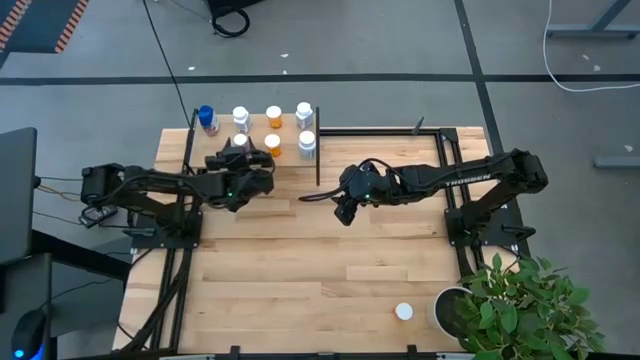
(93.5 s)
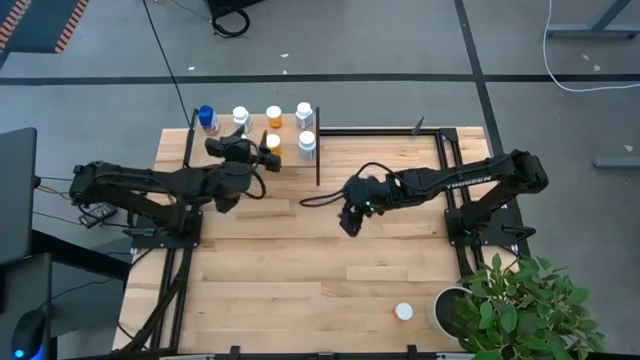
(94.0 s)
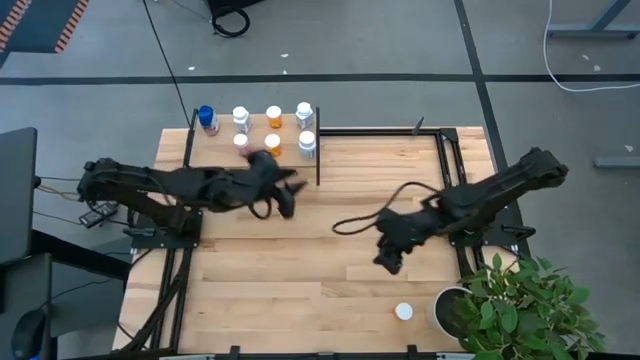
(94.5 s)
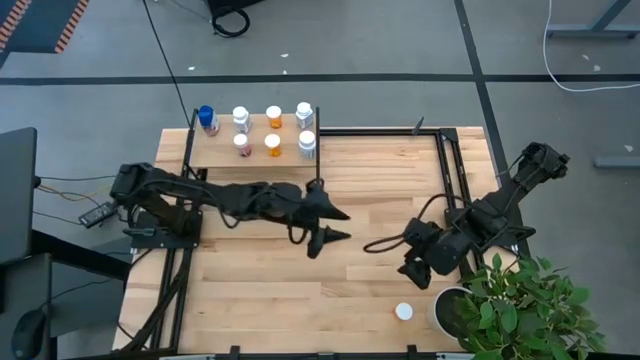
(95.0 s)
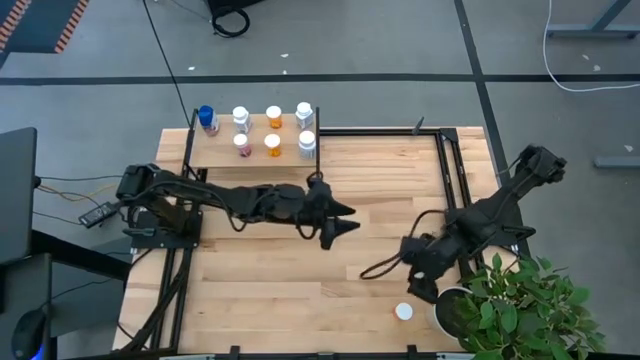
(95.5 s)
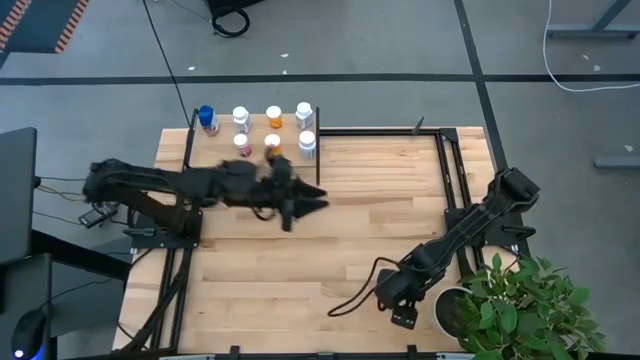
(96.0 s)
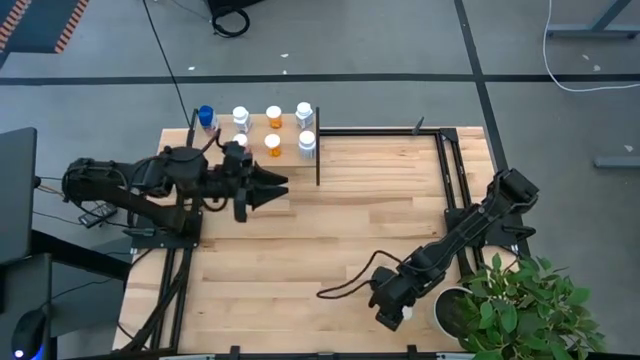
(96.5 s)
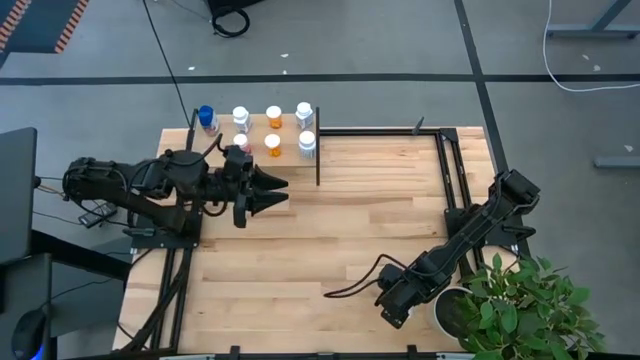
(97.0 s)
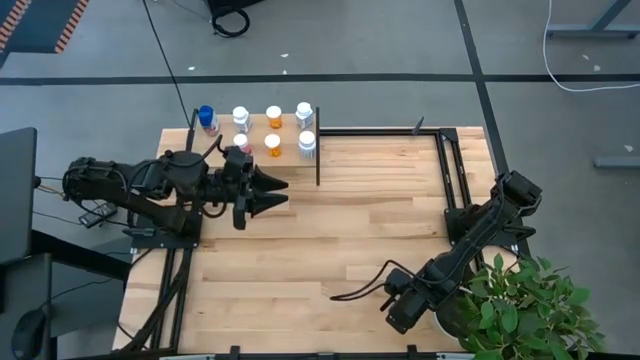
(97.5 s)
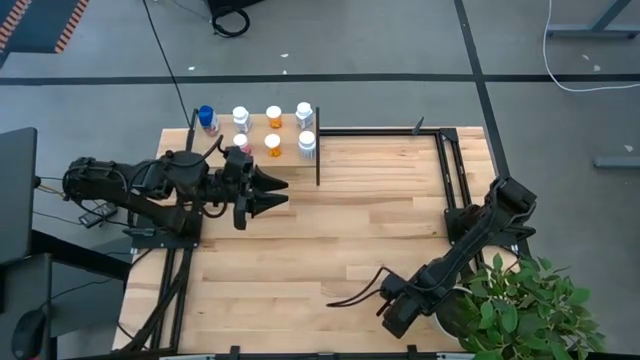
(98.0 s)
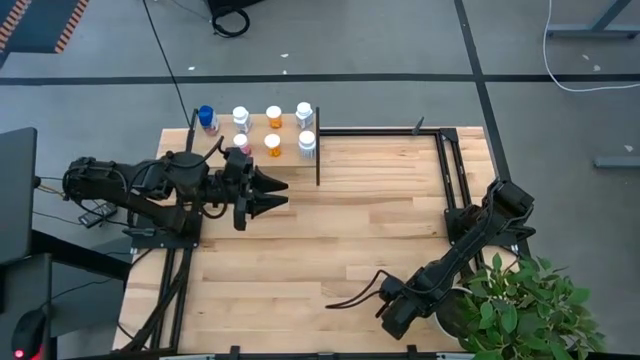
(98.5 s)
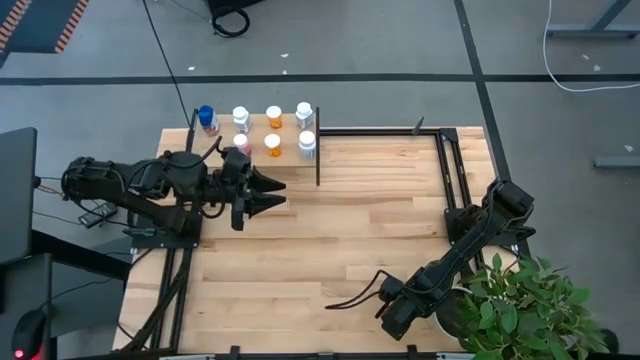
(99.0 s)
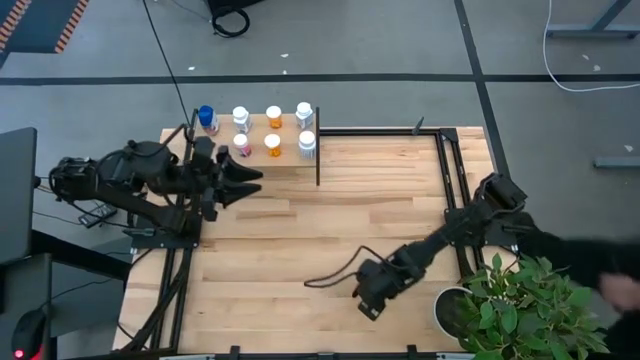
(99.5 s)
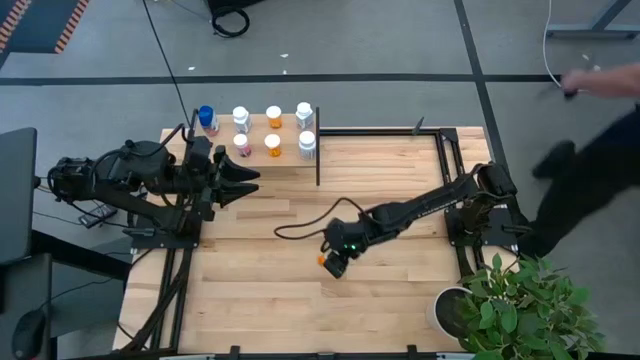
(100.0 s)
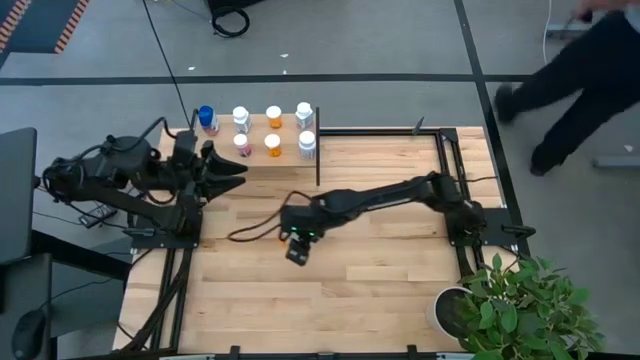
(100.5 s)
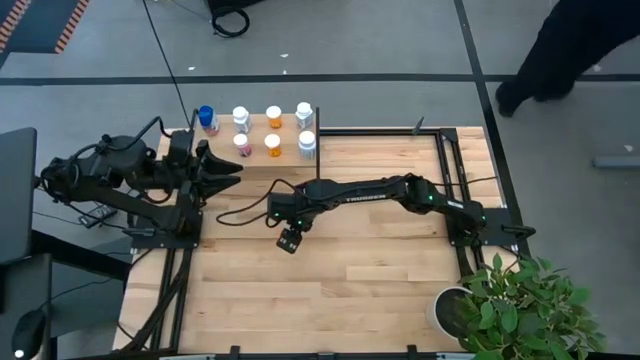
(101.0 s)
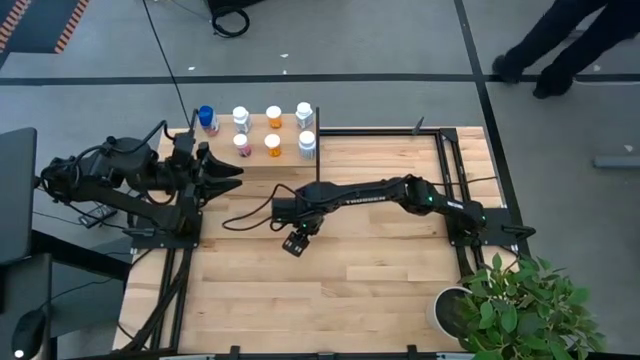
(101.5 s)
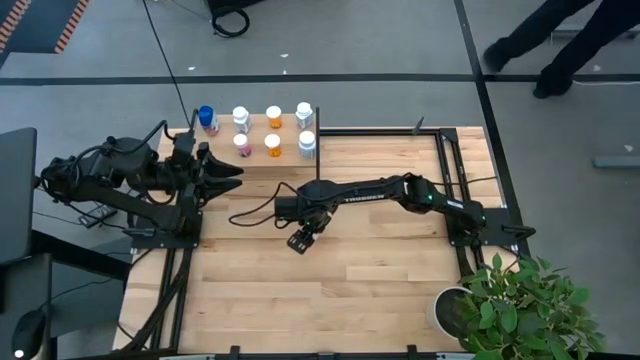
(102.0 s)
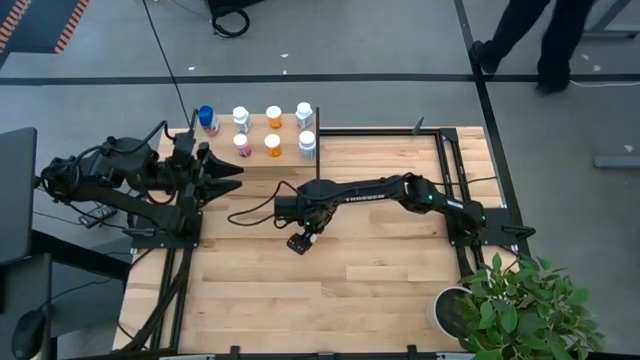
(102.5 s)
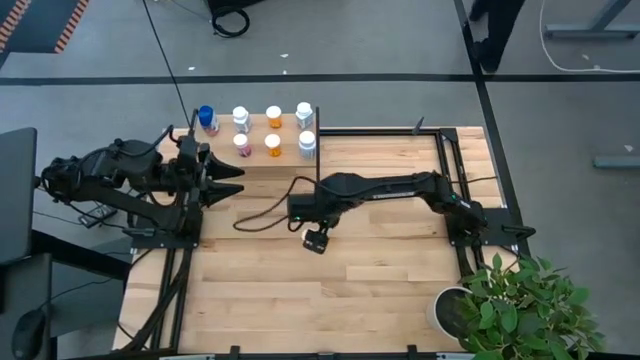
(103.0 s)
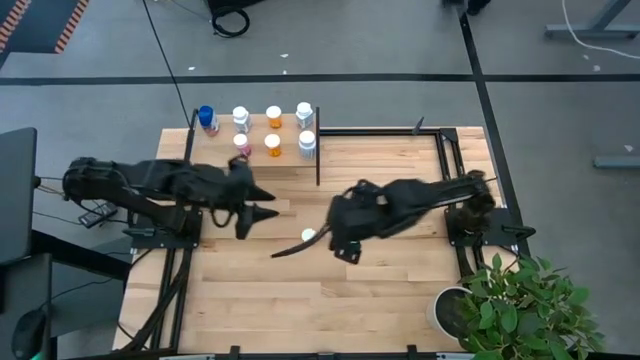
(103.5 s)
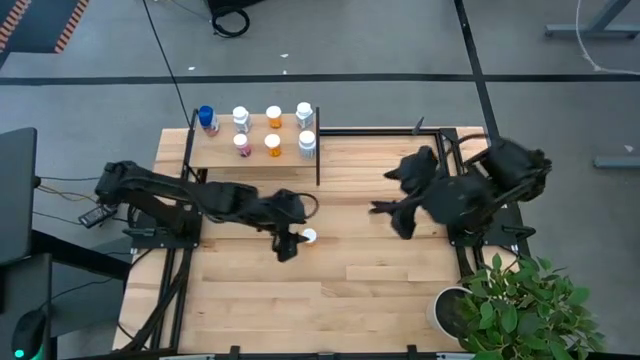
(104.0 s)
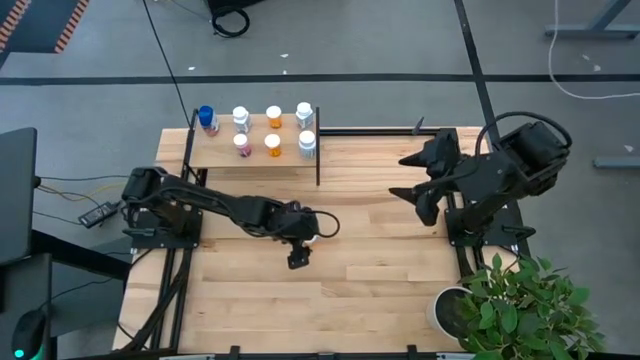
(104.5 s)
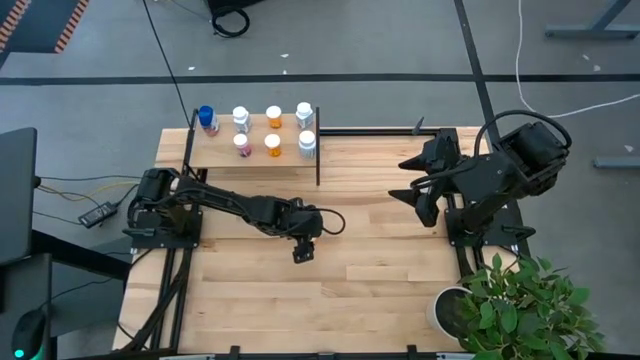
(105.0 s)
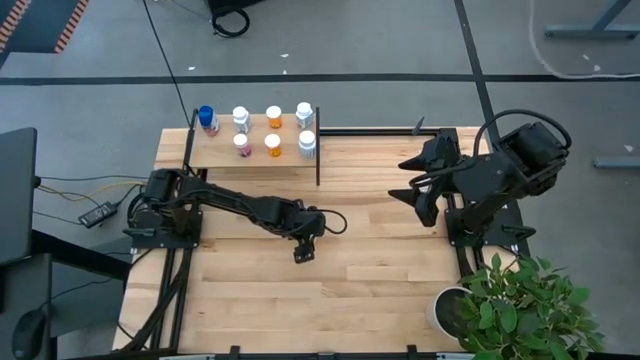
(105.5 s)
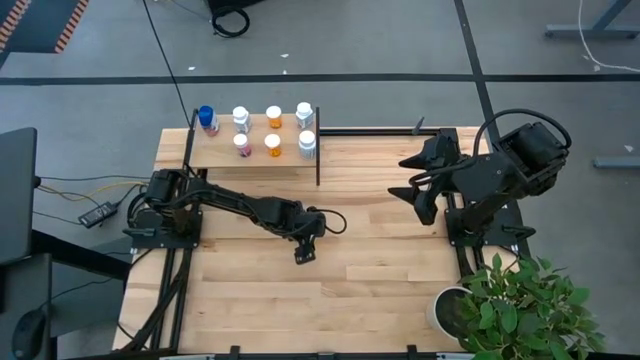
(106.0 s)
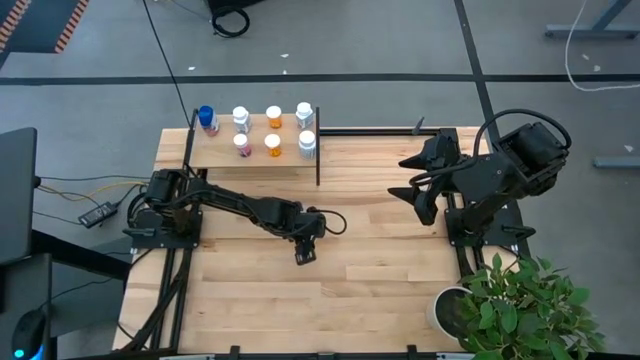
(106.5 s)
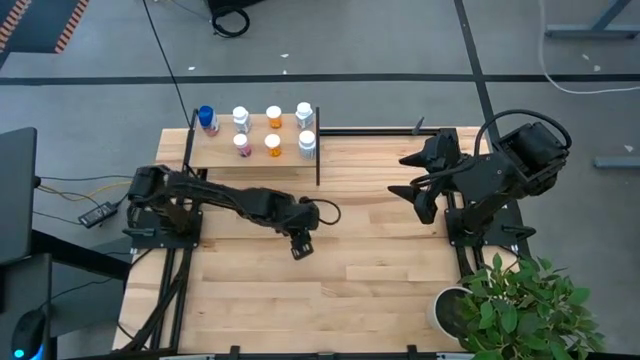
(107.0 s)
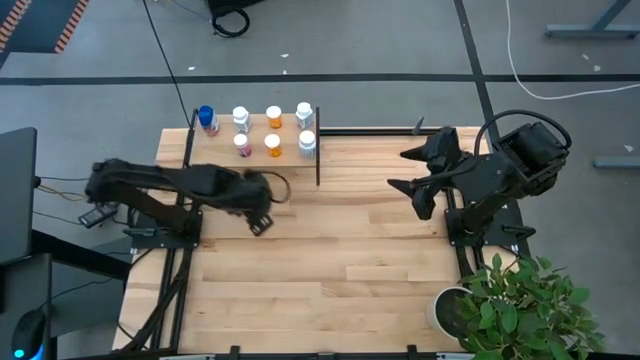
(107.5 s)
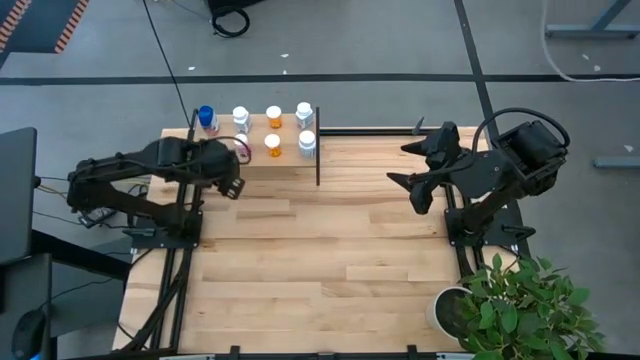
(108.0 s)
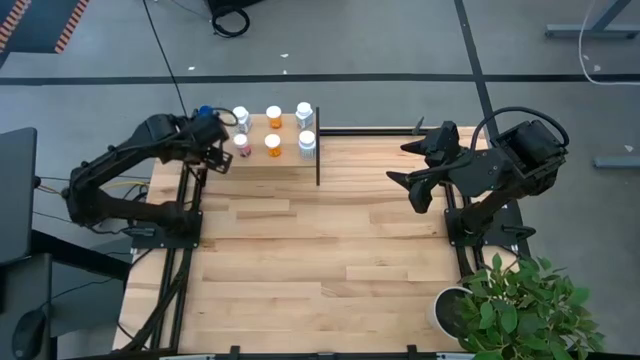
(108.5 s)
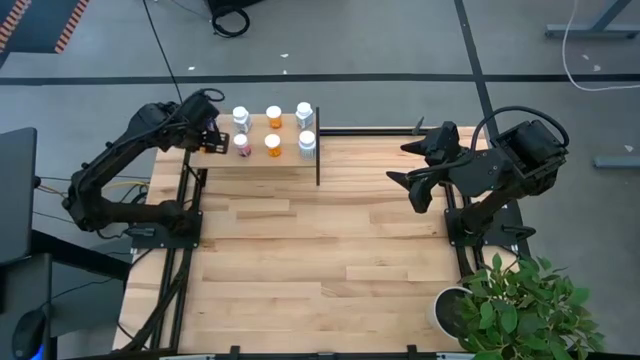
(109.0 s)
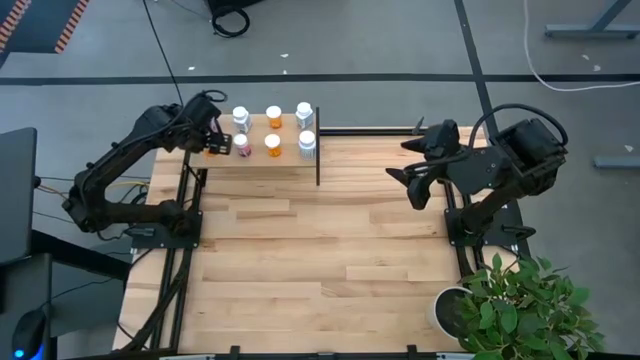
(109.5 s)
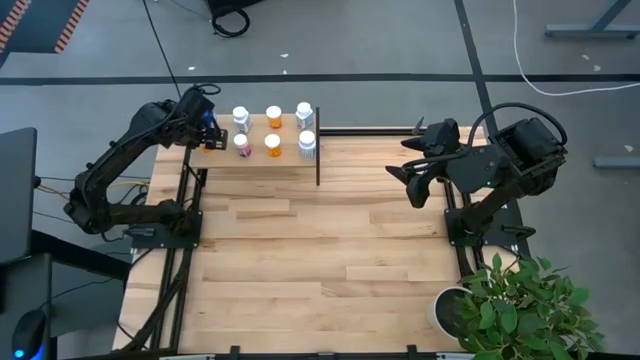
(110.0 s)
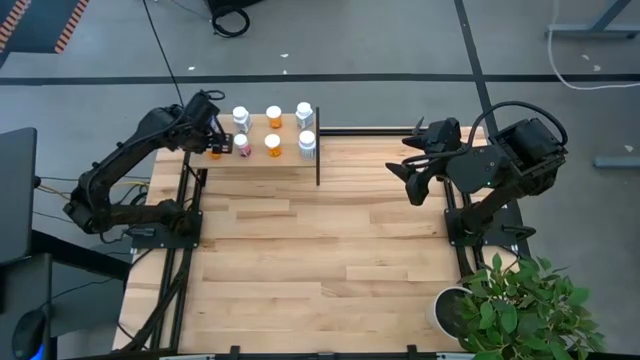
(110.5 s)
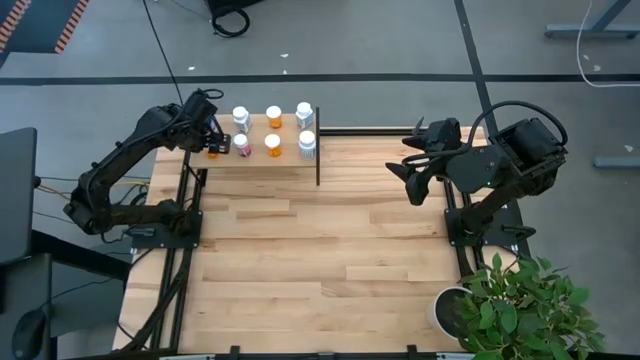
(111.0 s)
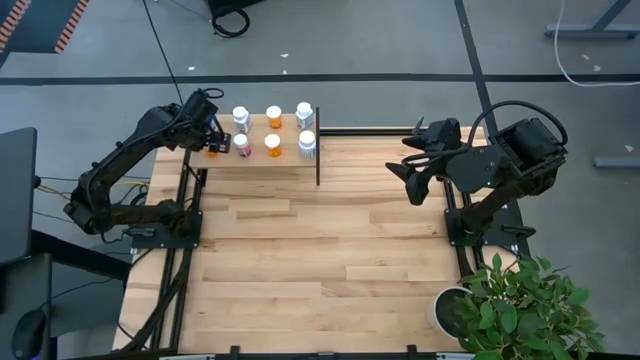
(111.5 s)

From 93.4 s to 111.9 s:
Task: Pick and place medicine bottles onto shelf by color
Put the orange pill bottle on the shelf
